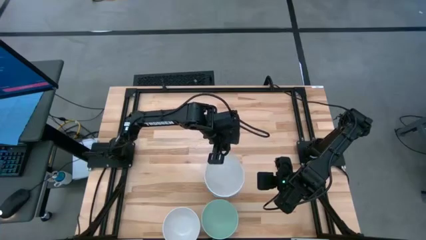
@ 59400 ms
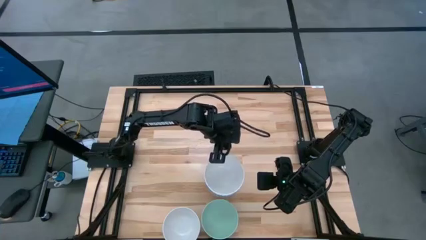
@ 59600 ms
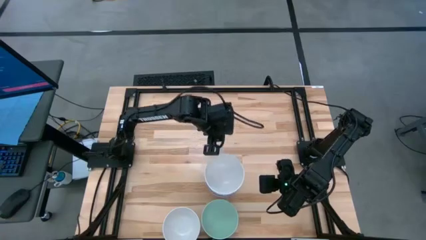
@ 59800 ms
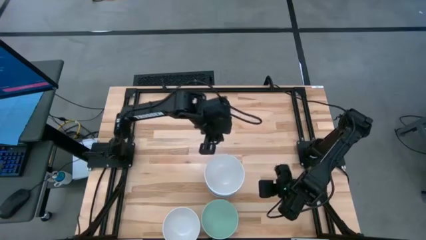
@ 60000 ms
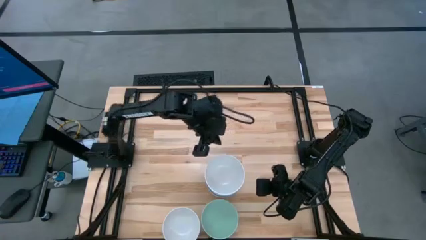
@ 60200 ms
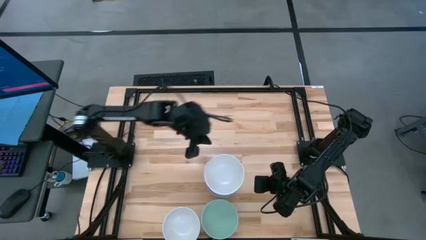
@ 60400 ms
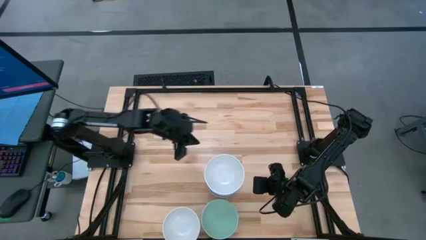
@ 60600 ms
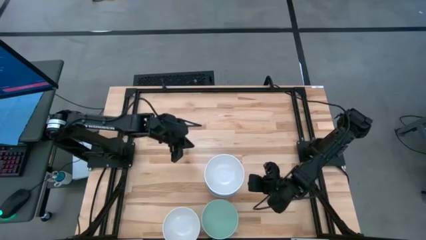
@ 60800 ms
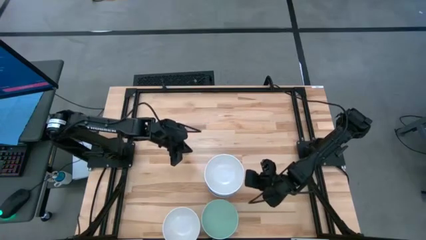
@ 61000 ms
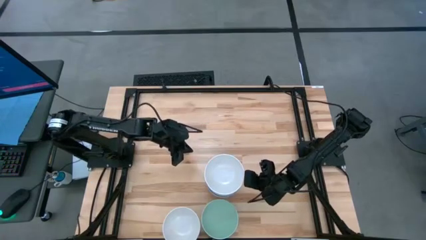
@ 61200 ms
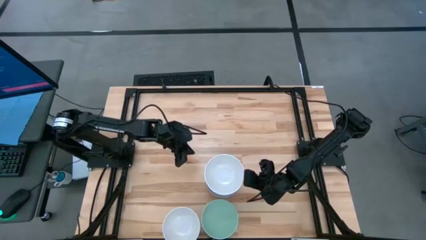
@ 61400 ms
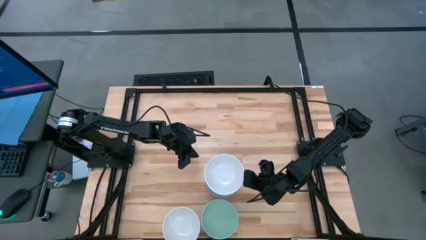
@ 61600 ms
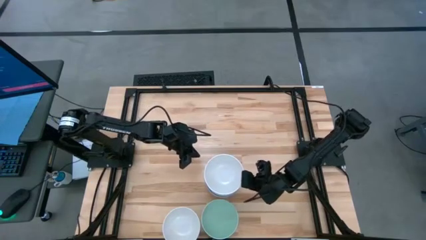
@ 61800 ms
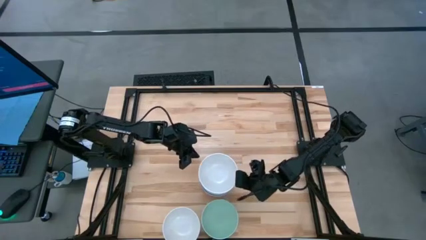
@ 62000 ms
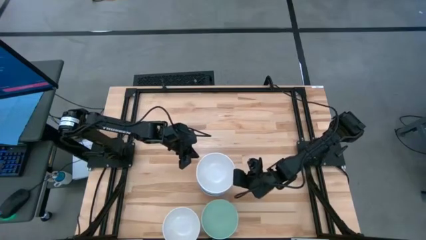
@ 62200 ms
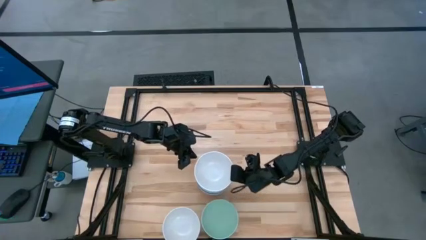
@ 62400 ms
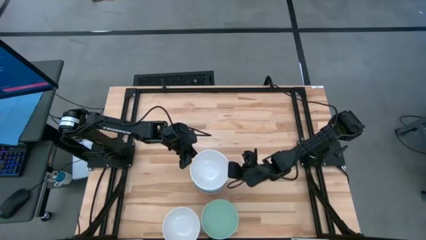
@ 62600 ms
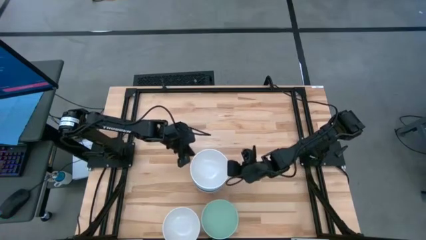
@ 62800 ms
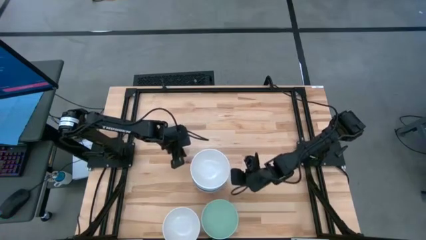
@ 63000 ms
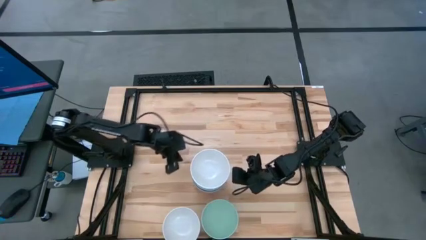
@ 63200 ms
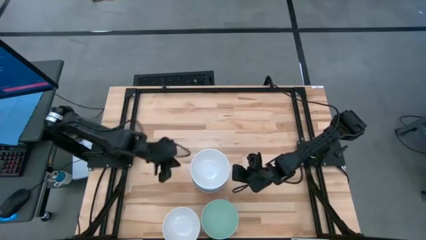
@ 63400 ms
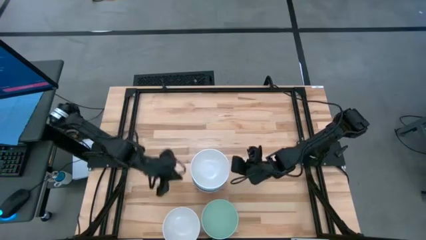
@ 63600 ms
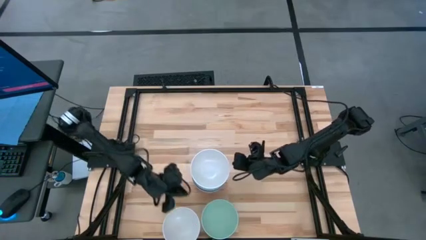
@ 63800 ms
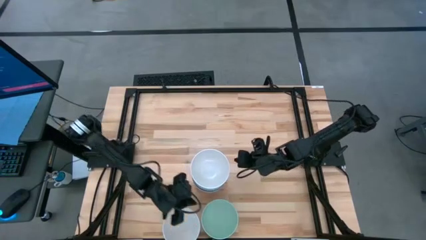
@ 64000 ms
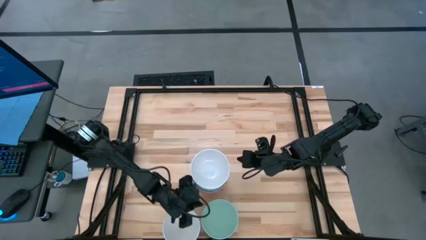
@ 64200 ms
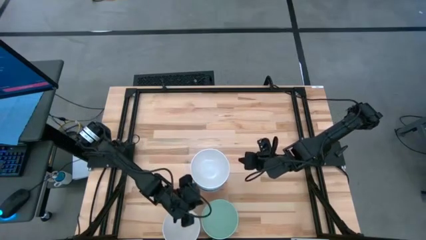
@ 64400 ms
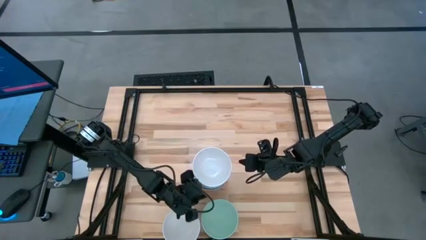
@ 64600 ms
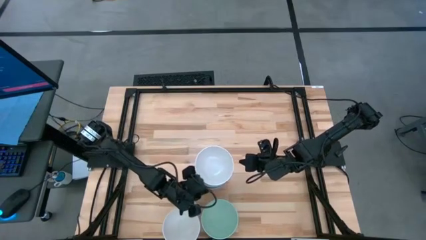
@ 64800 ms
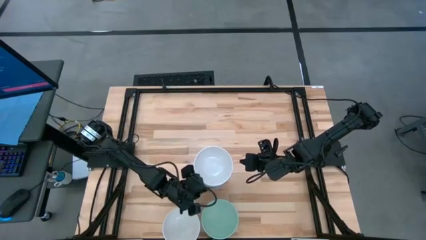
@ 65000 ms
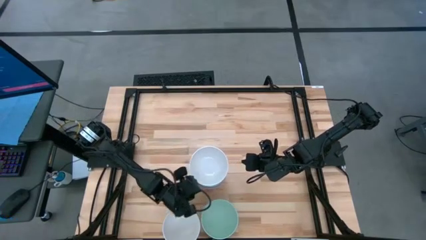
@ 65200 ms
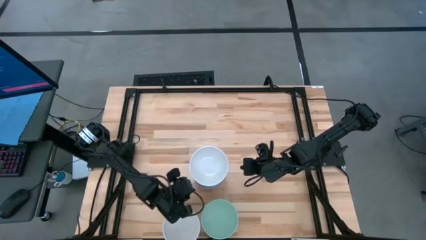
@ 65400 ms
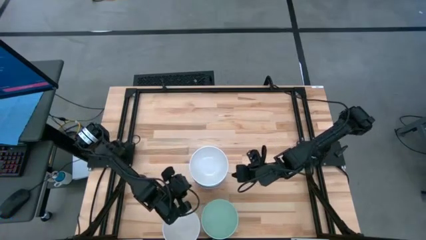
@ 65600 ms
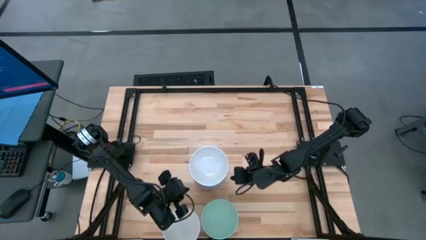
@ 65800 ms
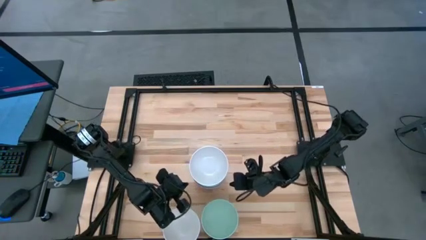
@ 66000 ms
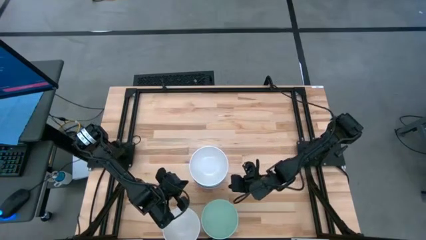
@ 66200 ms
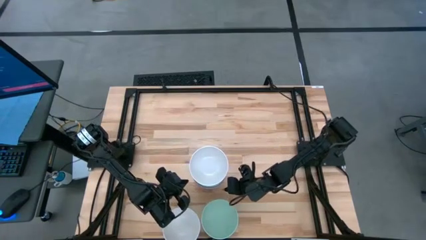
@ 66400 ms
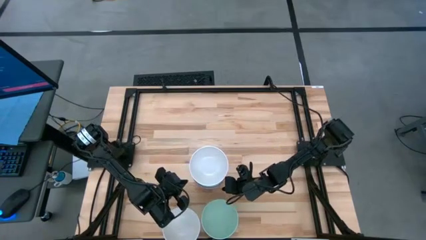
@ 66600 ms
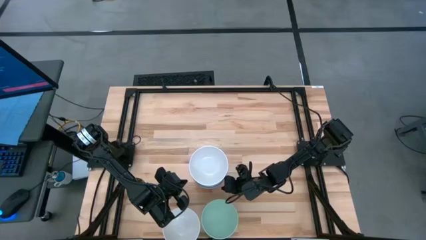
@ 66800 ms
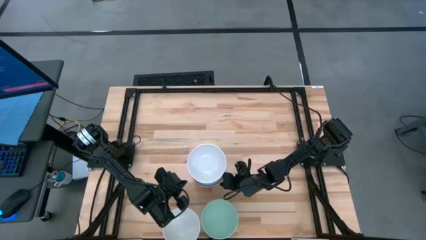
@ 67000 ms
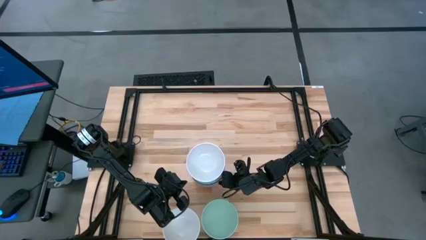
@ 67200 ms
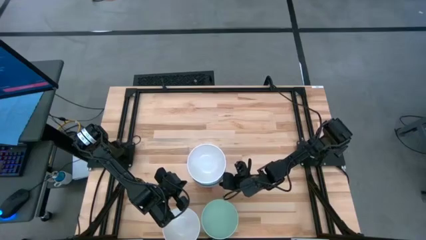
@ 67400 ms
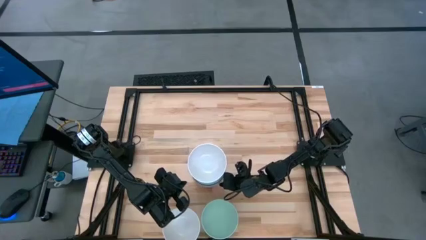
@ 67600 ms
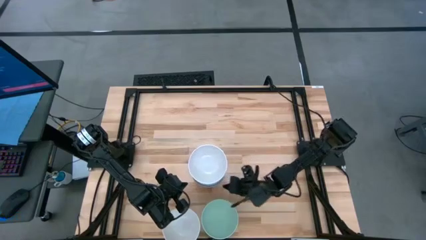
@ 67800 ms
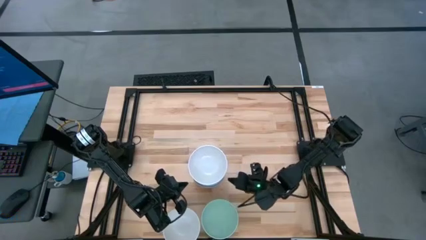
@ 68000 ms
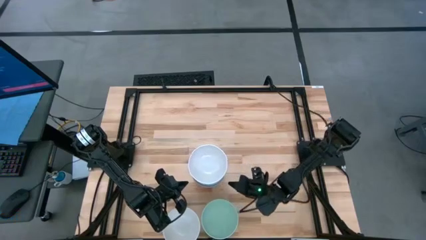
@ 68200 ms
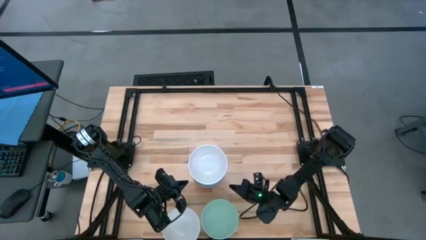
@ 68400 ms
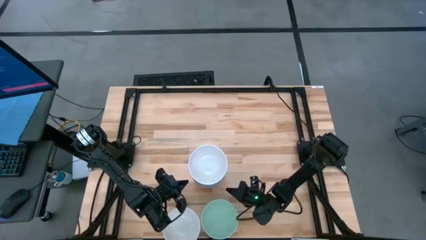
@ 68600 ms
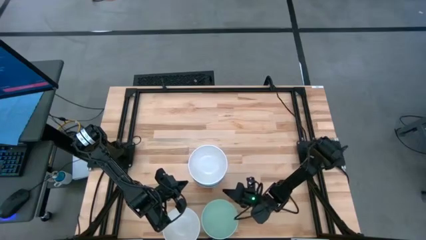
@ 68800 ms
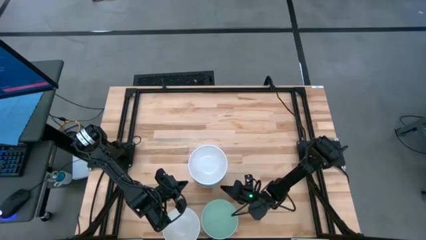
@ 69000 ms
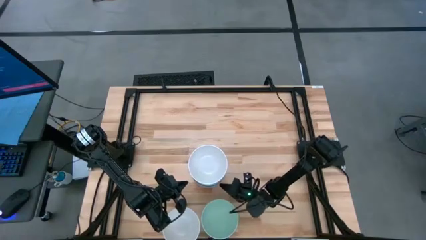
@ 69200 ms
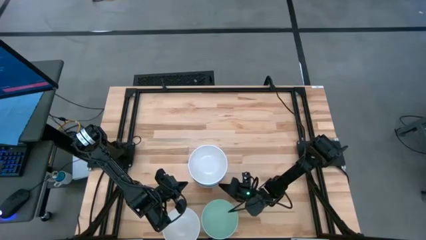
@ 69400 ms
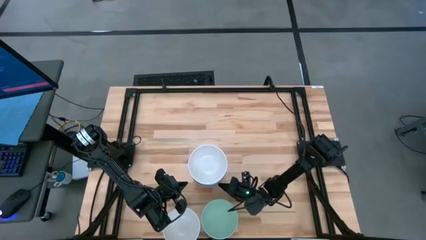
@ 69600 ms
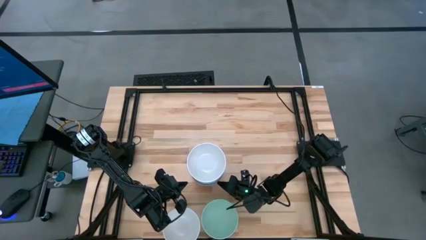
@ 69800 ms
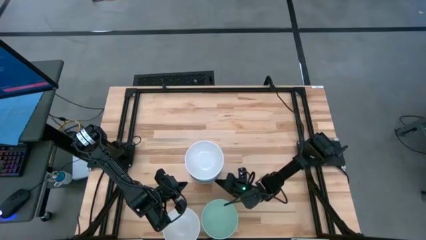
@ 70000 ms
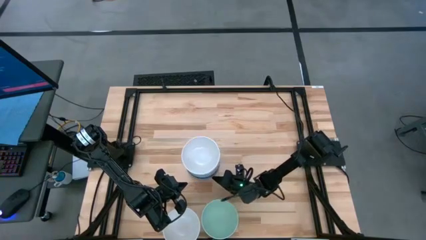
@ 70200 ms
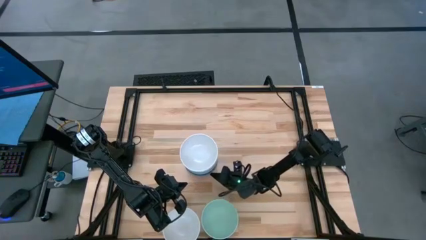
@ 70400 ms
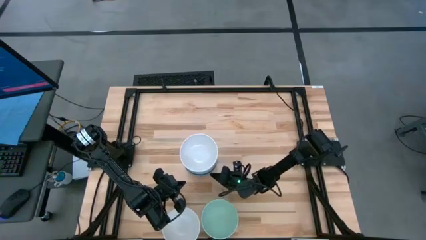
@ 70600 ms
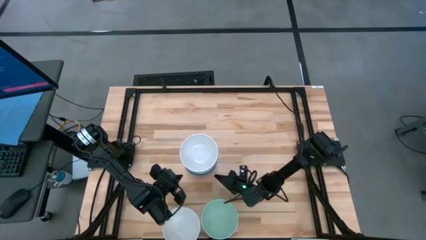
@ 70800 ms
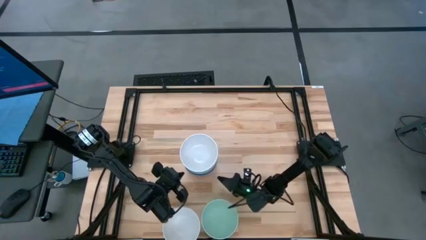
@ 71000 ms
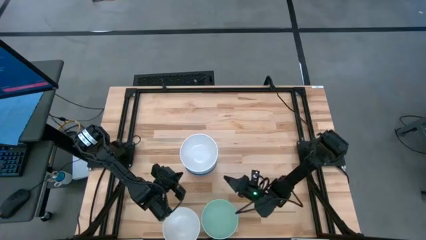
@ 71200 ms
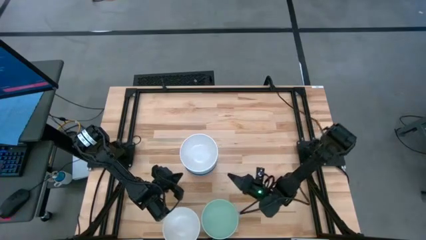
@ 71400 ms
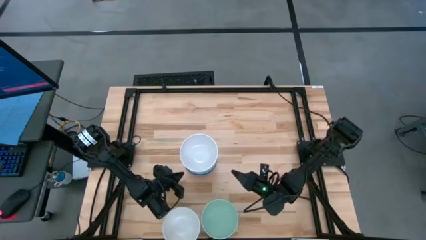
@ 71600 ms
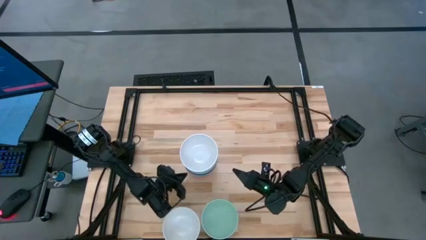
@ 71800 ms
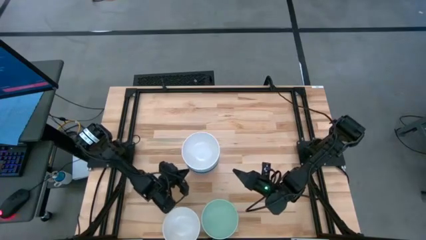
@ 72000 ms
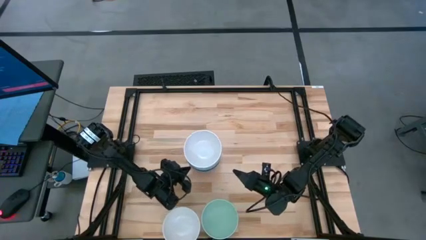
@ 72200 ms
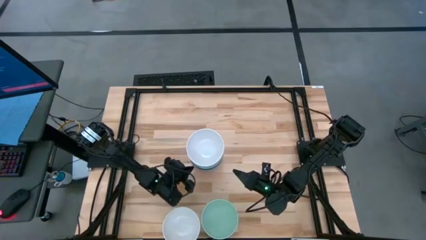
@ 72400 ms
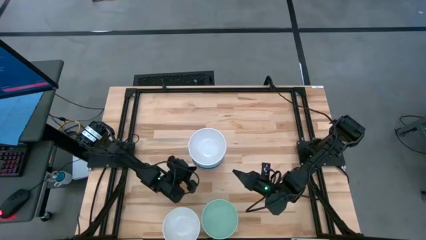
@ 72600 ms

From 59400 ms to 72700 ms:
Task: Nest bowls inside each other
Move the stacked bowls to the center of the table

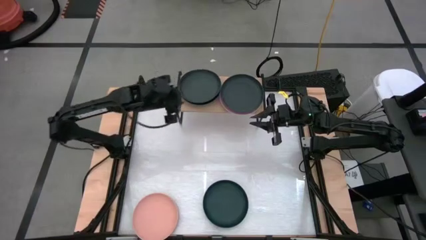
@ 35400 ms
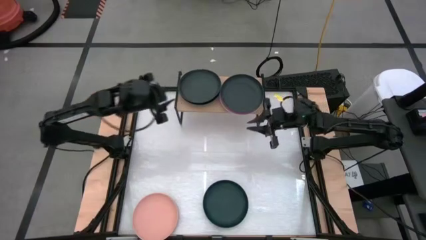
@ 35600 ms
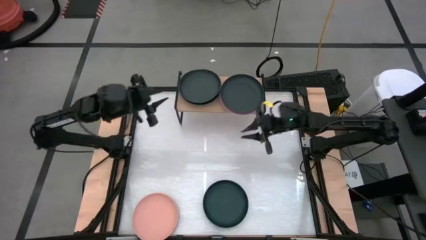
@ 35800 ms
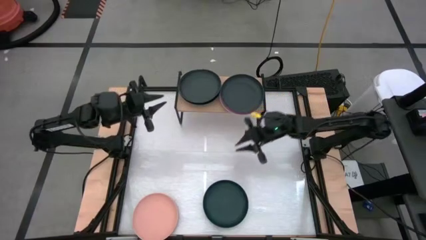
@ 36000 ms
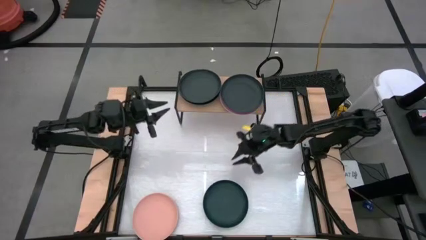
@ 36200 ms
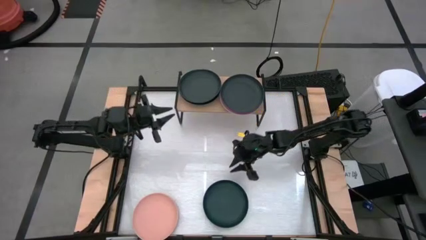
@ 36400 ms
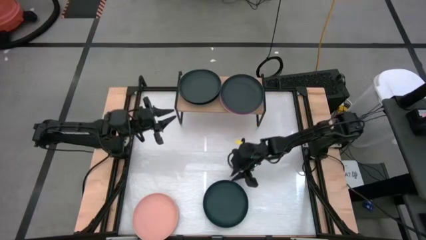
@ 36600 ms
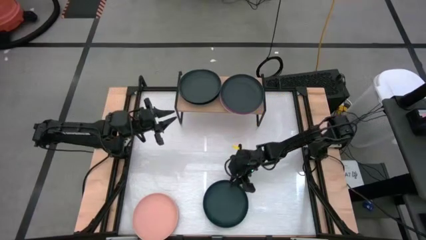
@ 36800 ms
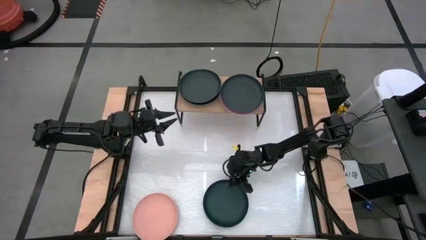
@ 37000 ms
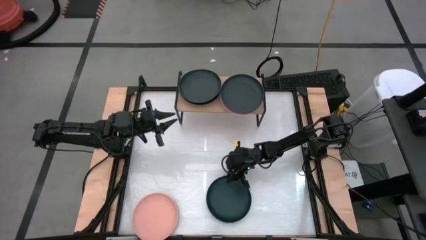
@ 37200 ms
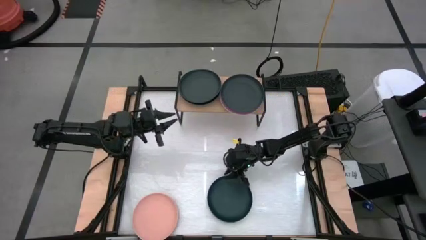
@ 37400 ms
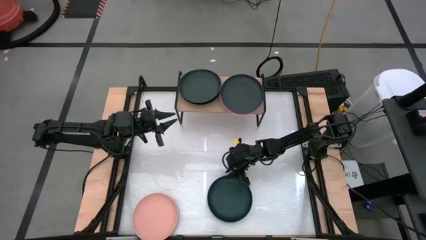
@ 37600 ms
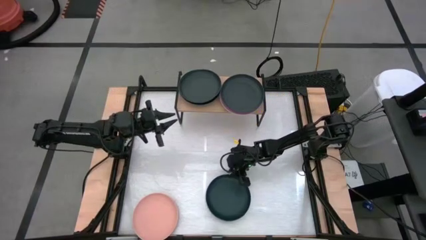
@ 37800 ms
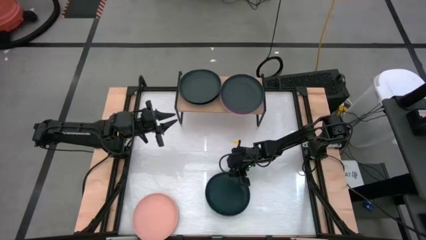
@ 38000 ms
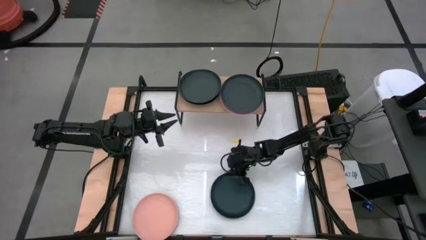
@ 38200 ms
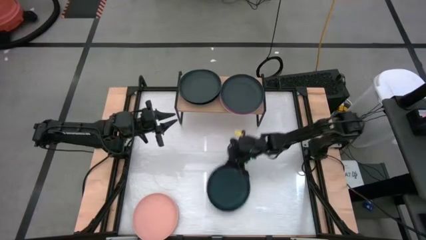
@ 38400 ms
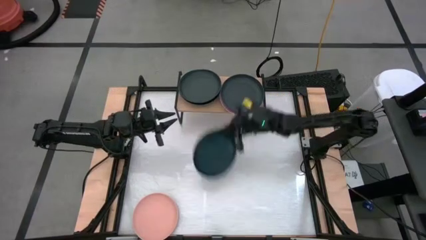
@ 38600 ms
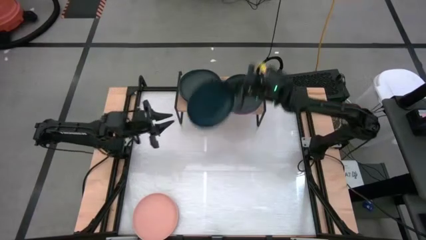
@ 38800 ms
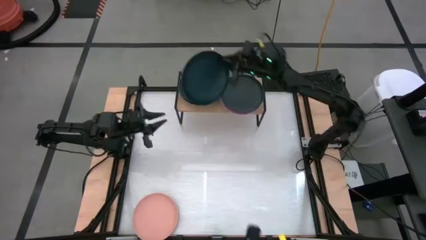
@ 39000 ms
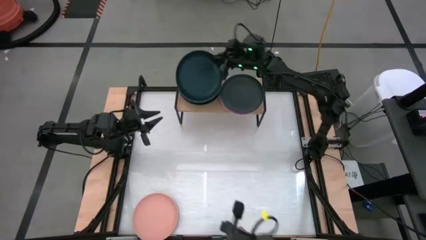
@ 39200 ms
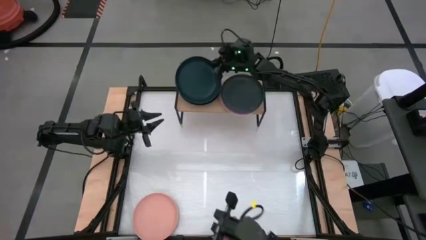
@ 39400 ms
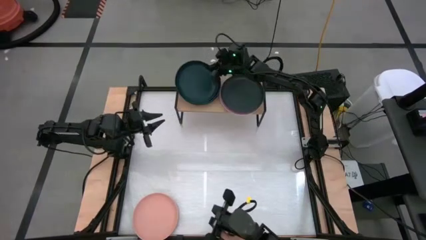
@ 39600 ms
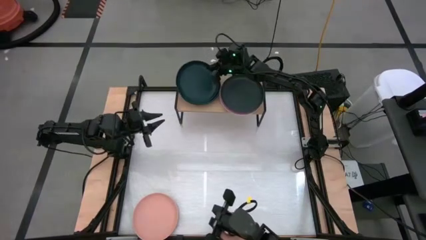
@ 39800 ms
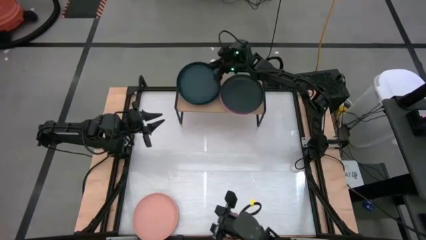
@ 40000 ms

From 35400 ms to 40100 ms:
Task: Place and stack plates onto a shelf
Stack the black plate on top of the black plate on the shelf
